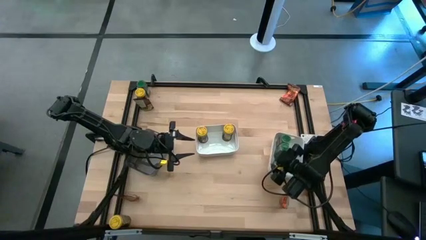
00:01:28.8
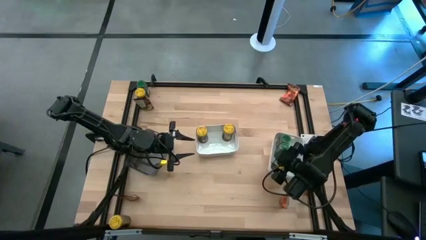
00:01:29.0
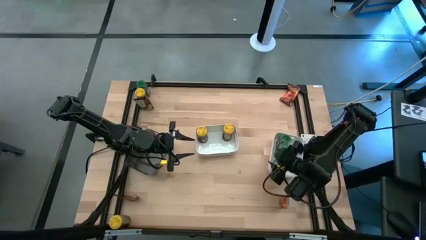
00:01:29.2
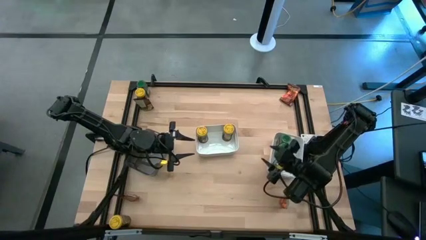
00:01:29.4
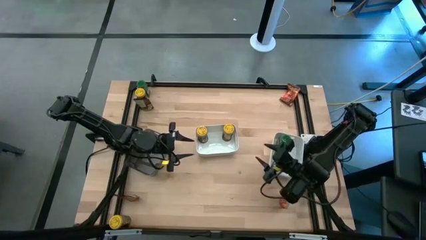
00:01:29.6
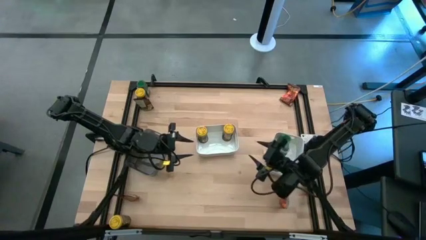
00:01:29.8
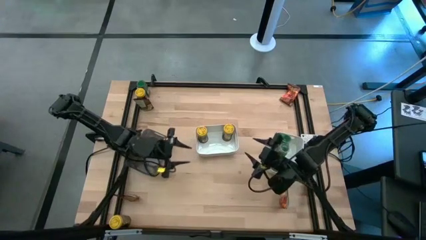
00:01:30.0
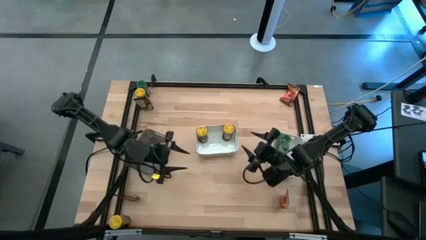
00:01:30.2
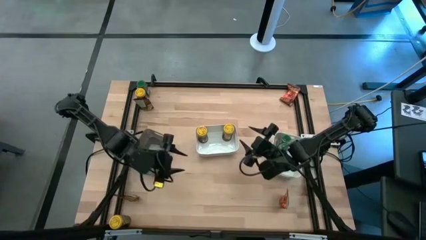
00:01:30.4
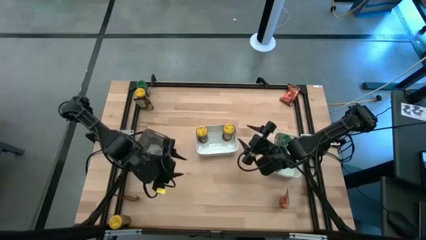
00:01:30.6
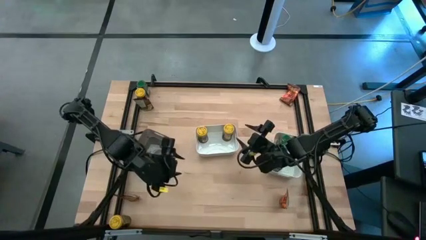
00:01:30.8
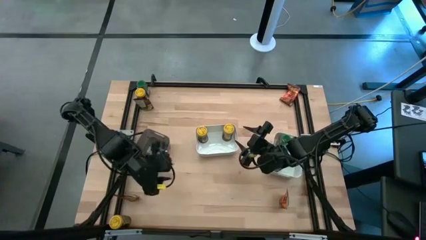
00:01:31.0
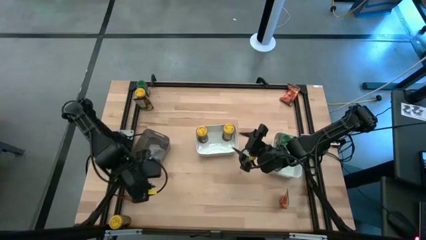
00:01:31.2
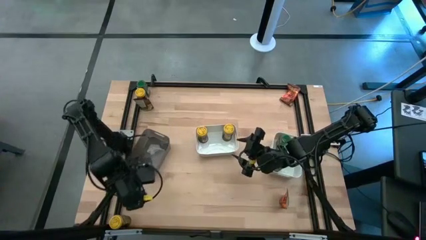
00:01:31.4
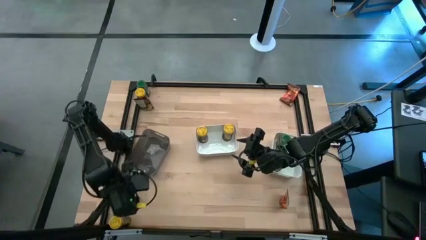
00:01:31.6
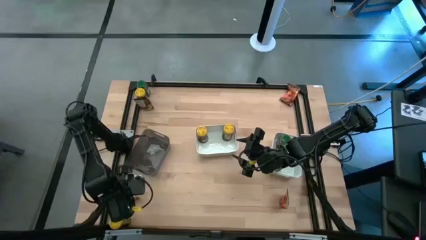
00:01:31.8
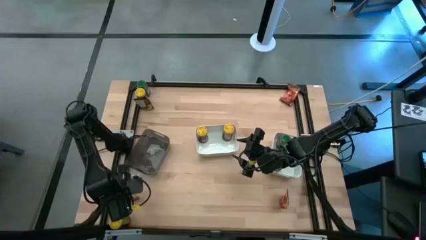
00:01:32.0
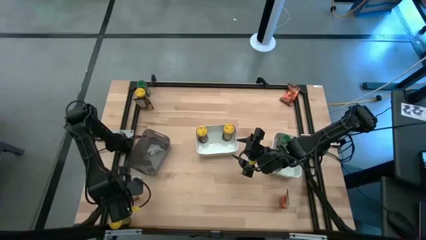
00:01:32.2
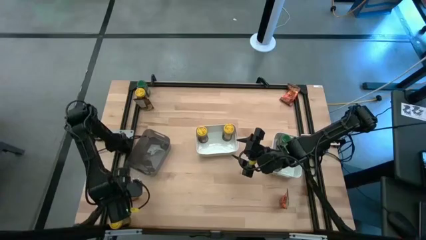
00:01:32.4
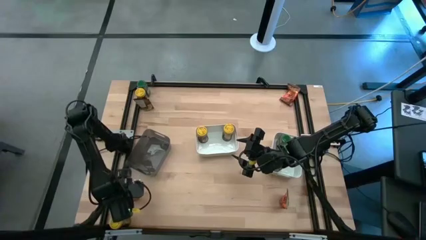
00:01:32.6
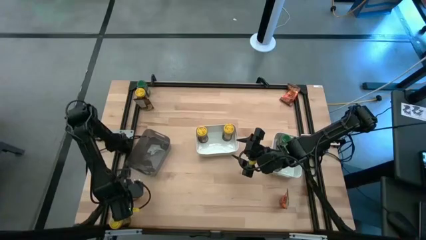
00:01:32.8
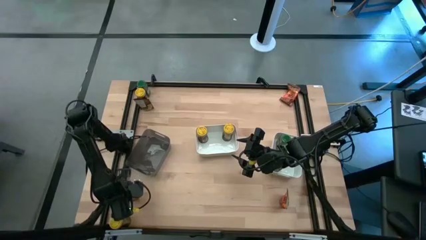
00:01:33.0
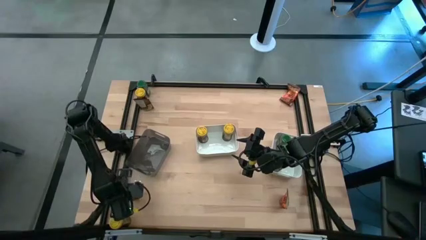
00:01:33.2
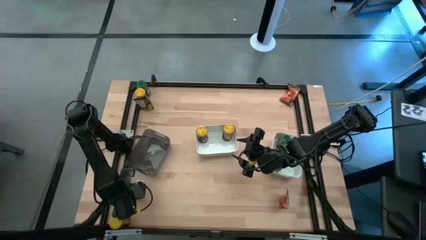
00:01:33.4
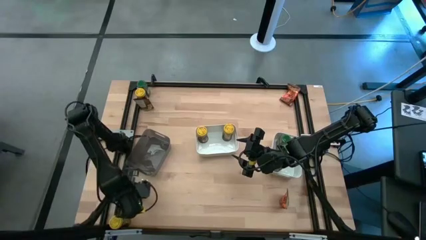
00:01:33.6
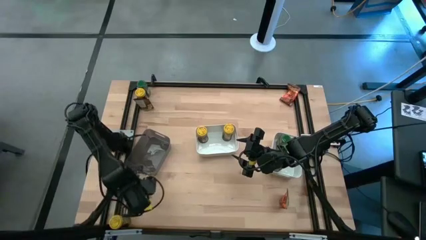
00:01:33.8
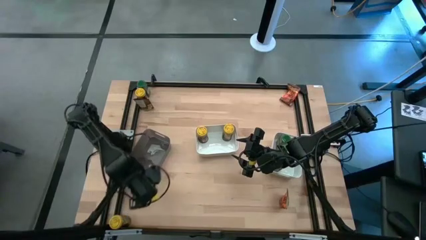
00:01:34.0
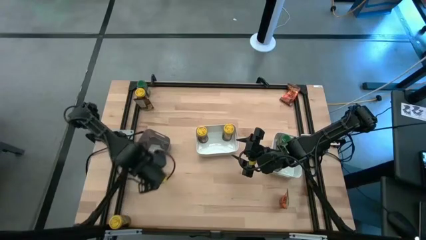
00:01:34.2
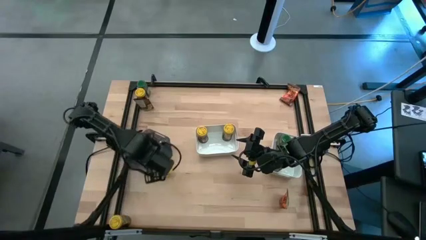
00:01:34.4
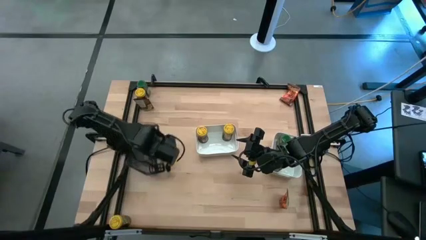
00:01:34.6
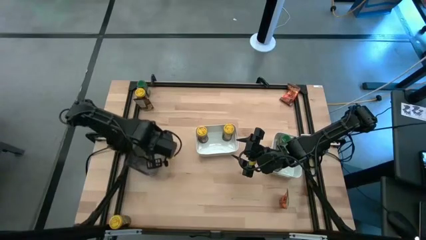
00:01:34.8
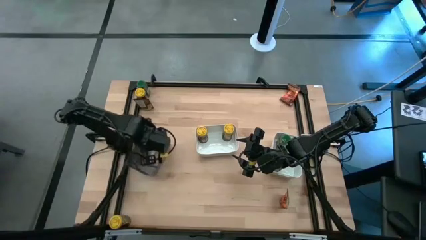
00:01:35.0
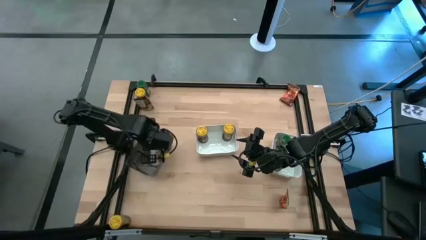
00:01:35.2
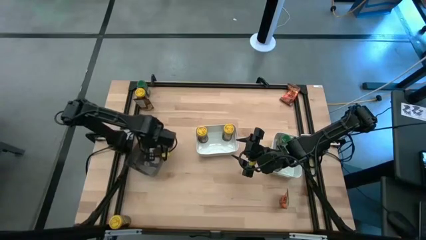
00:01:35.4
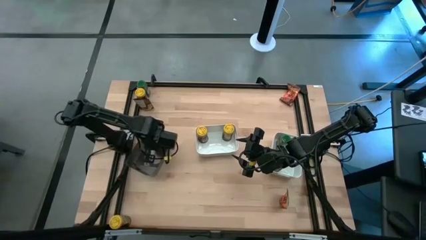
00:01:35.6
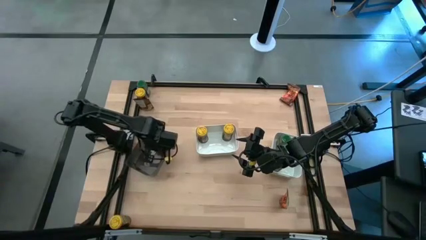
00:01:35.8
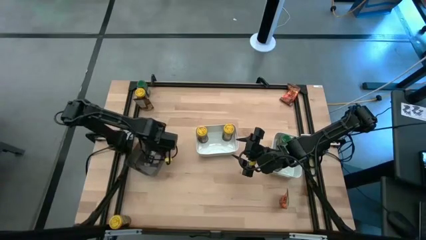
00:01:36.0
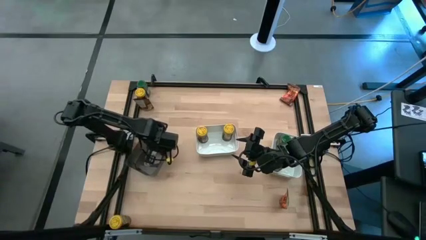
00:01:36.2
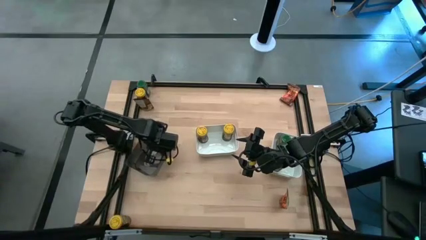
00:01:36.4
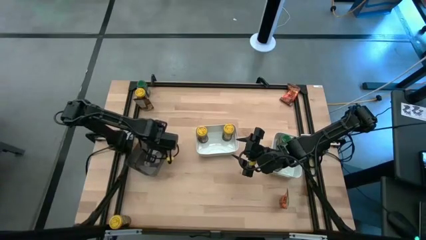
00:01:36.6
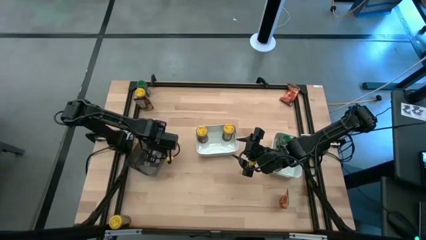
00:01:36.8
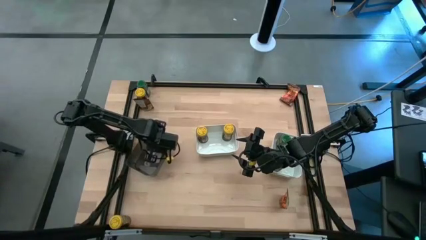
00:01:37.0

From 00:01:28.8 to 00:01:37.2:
Task: Sort spices by type
Put the bottom left orange seasoning pack into the black bin

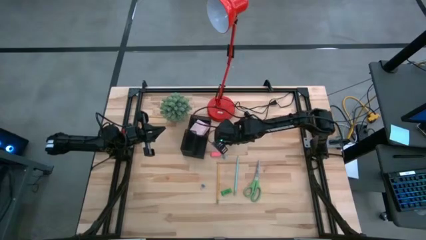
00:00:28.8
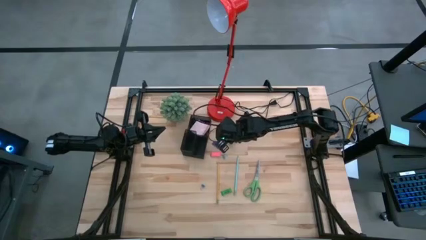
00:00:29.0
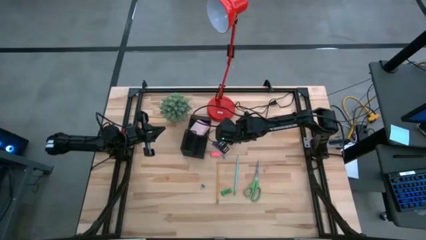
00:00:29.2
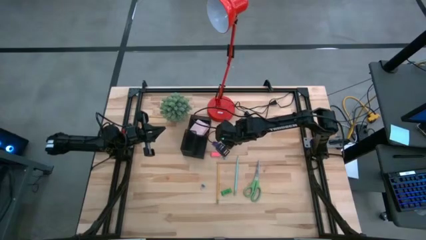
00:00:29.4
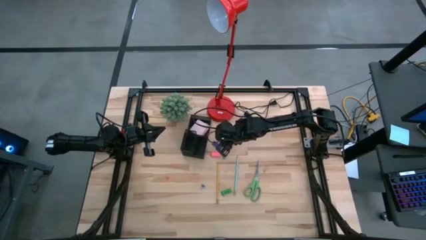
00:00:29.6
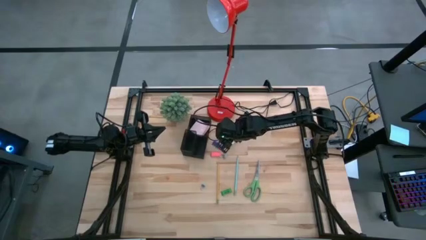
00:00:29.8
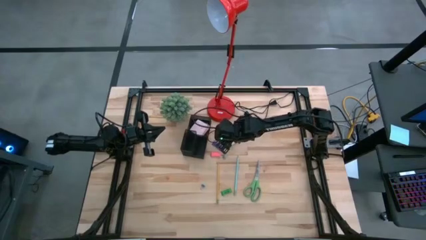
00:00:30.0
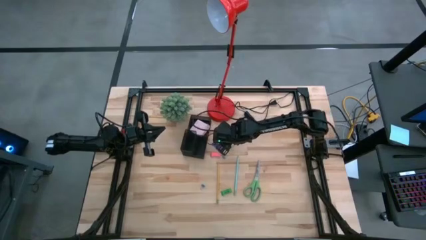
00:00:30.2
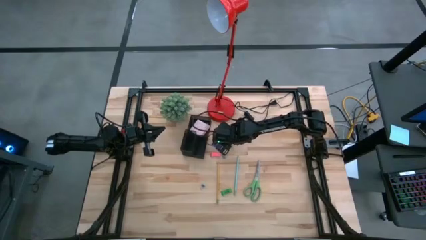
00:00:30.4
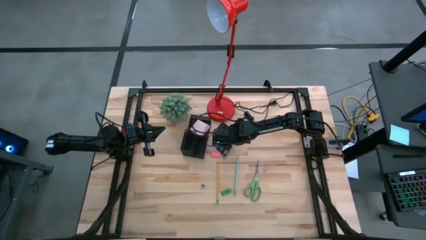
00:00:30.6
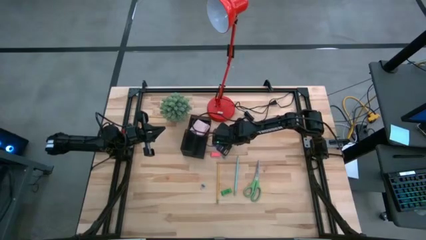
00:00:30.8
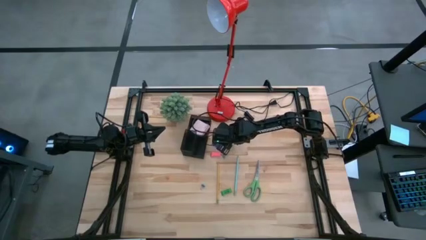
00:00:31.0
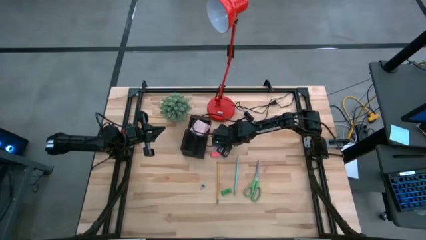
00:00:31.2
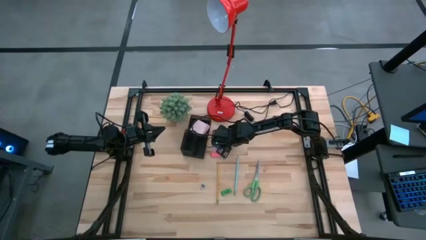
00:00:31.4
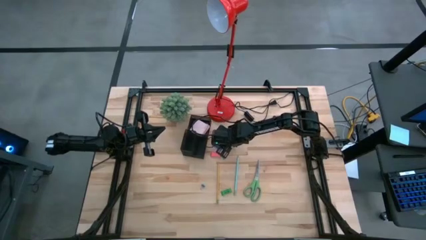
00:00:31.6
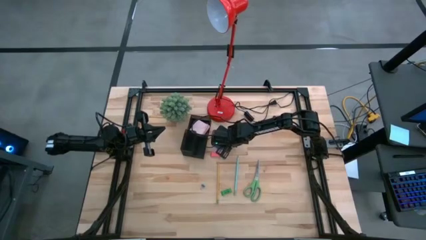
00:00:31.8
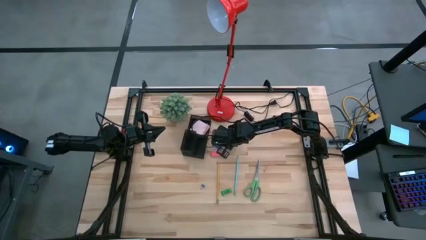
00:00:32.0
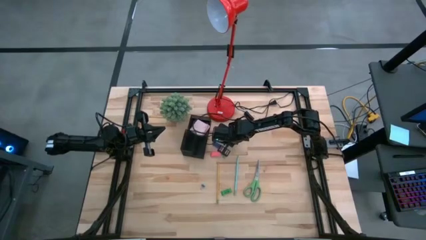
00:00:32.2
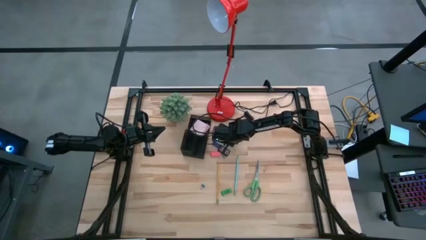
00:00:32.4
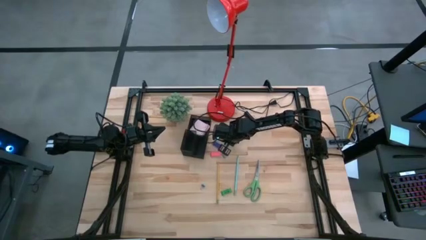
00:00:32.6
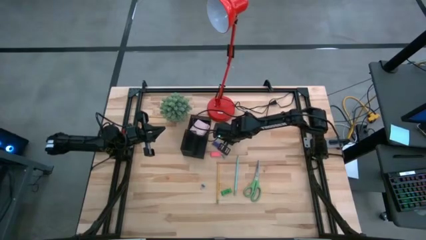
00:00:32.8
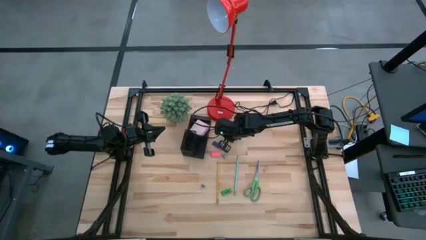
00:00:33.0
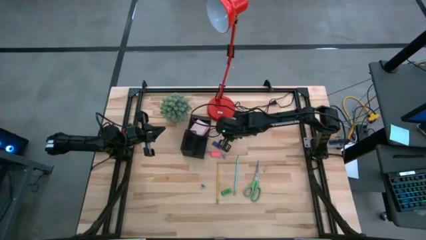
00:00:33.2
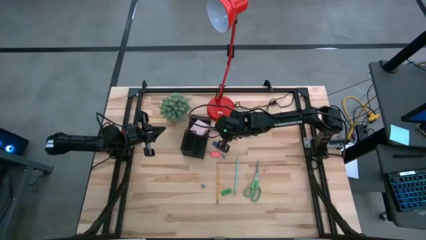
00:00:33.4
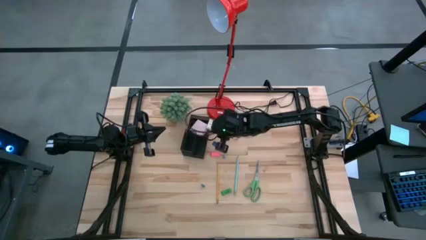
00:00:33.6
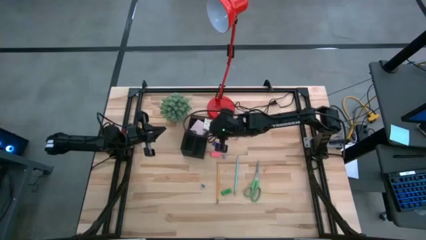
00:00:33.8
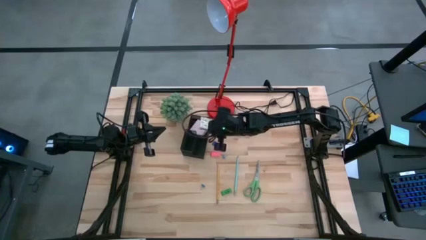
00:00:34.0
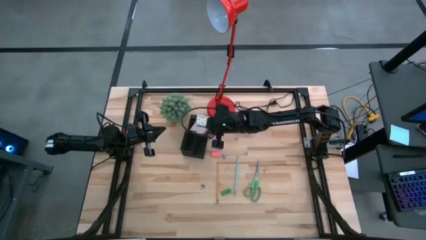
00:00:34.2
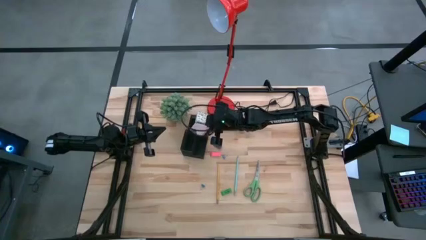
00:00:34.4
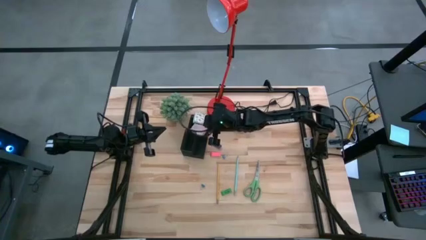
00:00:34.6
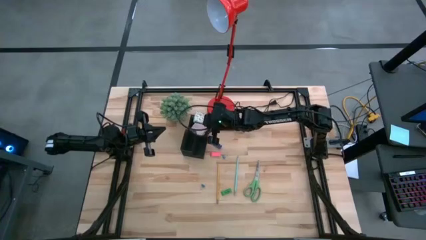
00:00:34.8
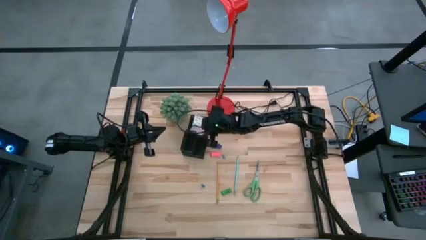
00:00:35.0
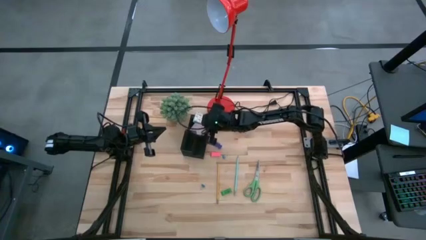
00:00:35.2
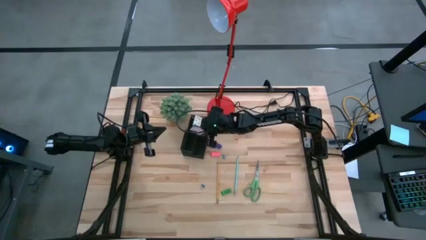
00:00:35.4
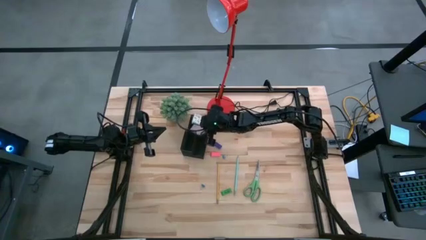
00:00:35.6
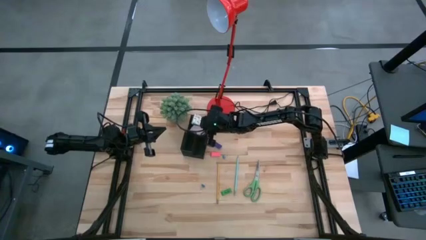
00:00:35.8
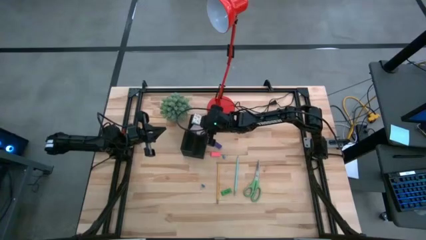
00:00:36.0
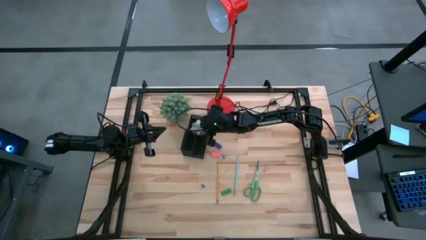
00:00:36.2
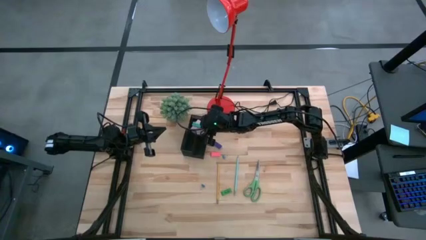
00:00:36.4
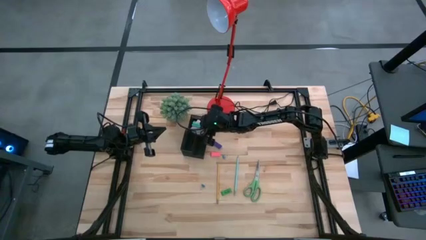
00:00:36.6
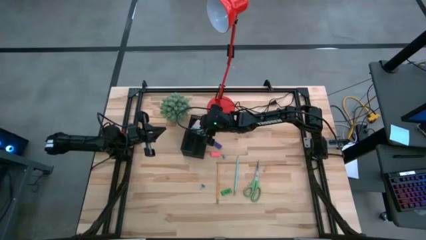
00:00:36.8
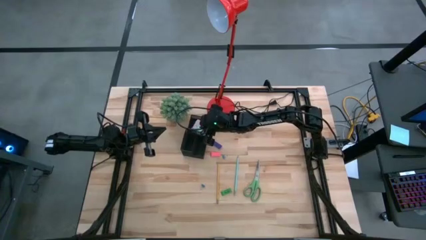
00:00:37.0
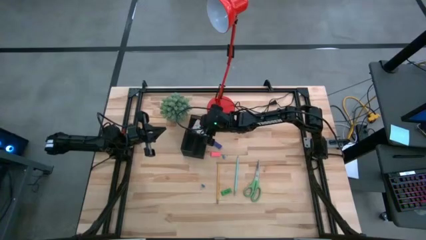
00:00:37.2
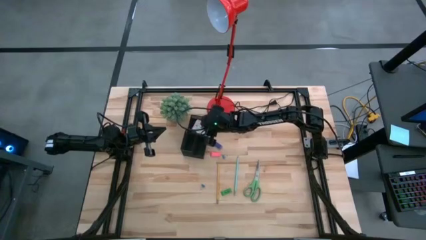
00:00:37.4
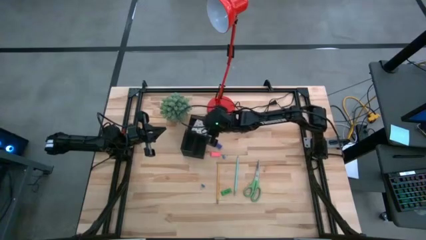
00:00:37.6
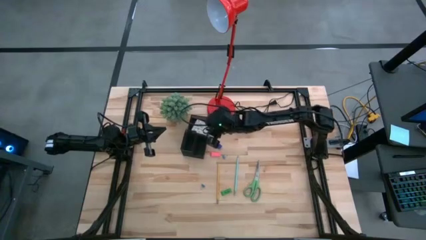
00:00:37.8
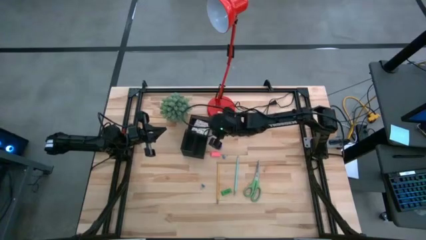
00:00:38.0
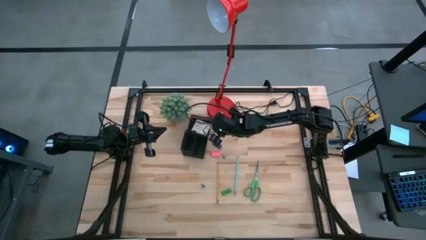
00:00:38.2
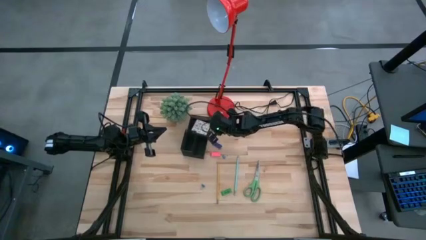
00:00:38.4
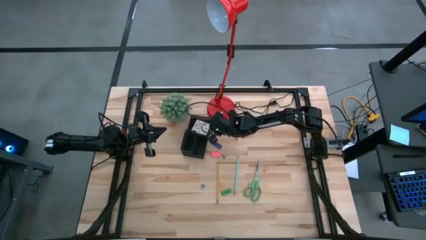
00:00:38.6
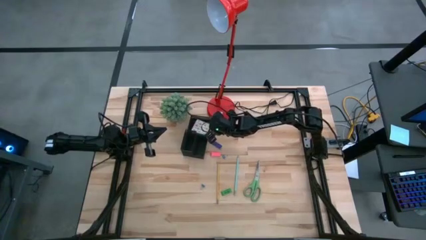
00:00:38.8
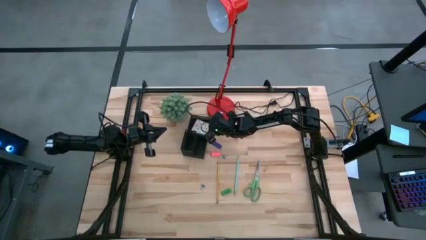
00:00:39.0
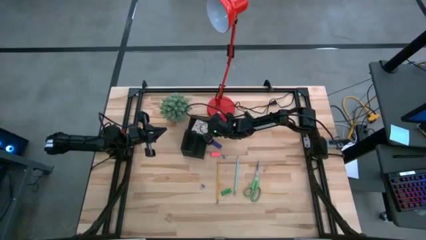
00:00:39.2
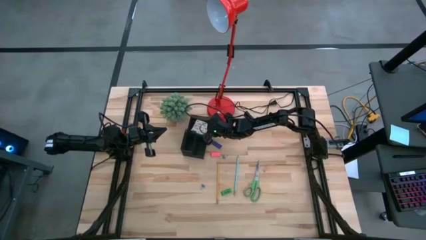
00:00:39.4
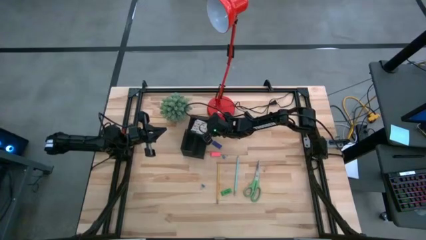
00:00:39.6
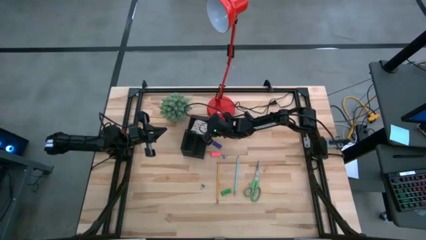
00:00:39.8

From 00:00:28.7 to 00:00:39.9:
Task: Pick and place office supplies into organizer
Put the green sticky notes in the black desk organizer
